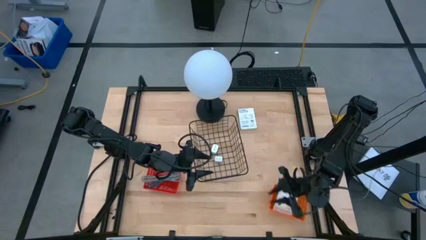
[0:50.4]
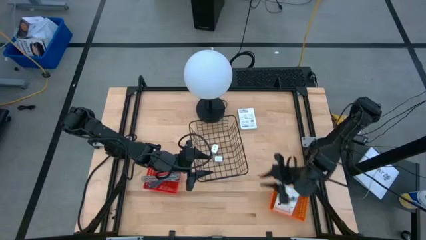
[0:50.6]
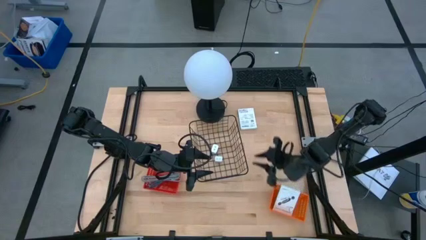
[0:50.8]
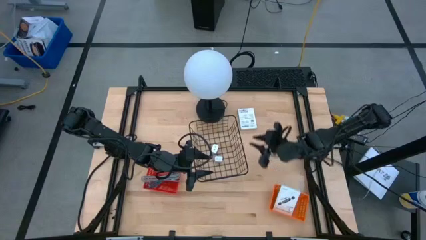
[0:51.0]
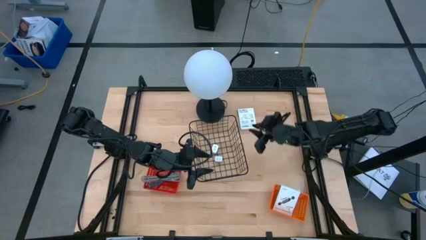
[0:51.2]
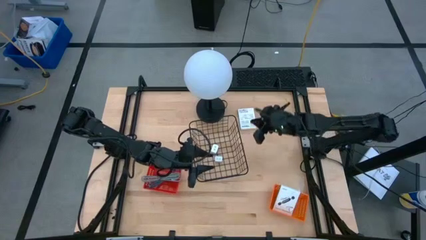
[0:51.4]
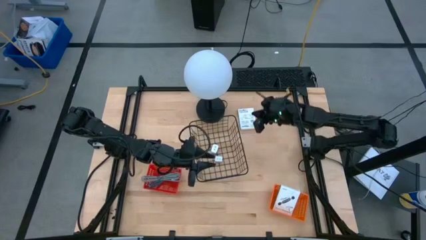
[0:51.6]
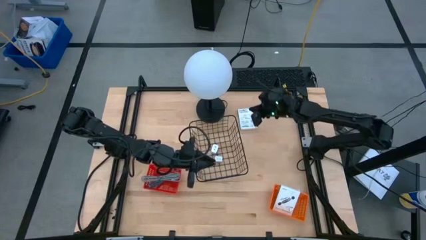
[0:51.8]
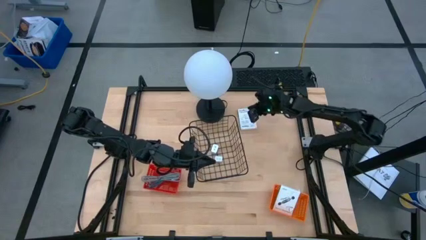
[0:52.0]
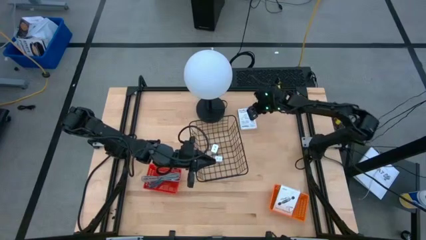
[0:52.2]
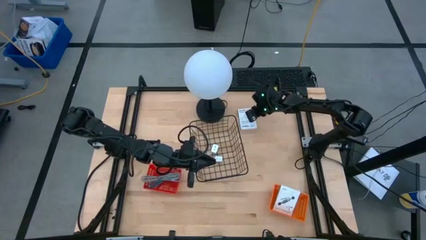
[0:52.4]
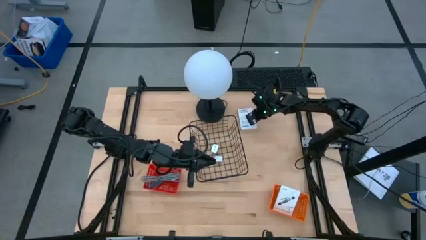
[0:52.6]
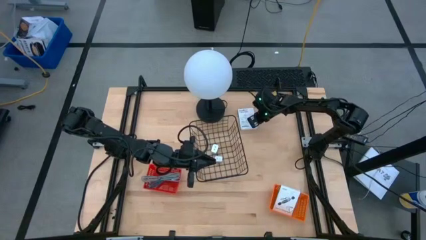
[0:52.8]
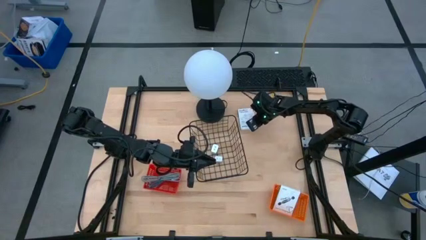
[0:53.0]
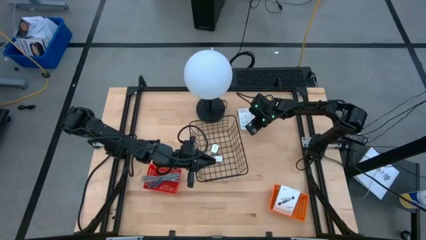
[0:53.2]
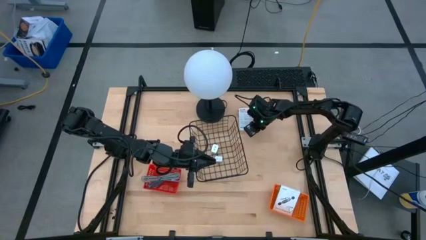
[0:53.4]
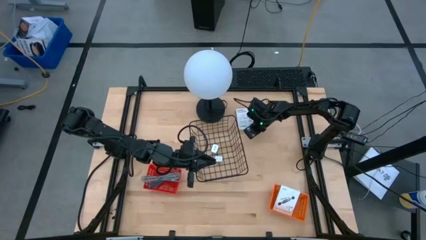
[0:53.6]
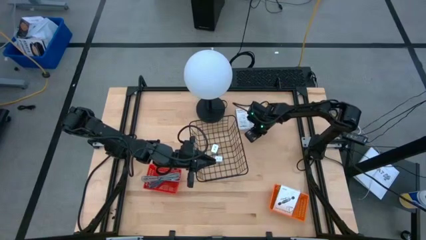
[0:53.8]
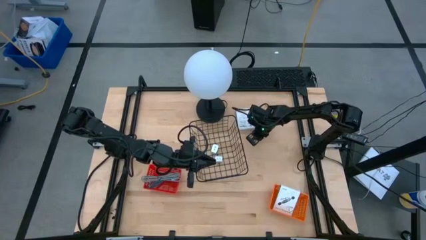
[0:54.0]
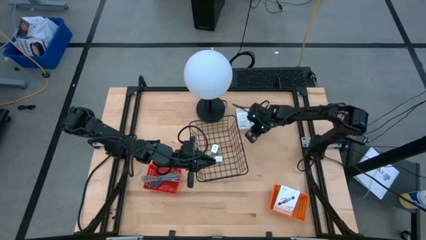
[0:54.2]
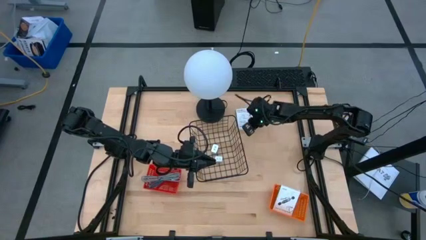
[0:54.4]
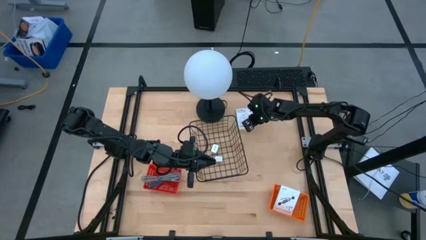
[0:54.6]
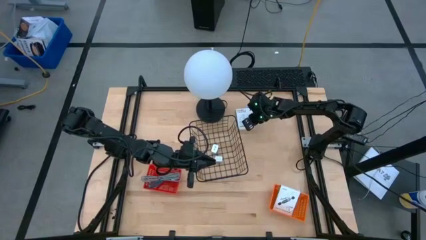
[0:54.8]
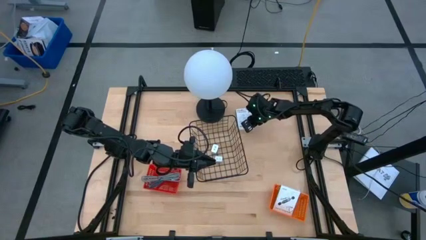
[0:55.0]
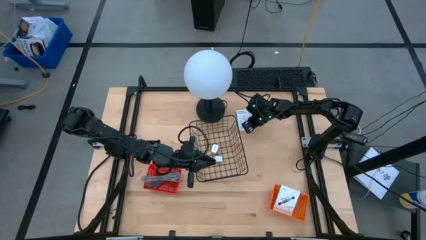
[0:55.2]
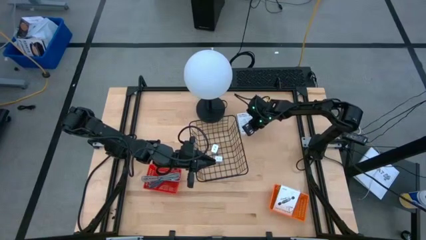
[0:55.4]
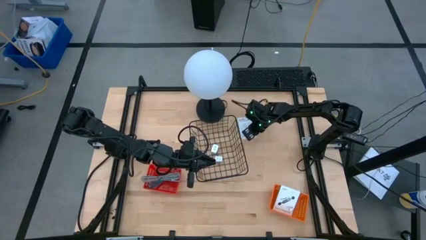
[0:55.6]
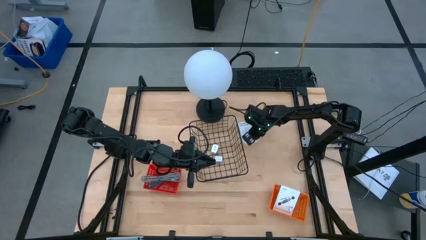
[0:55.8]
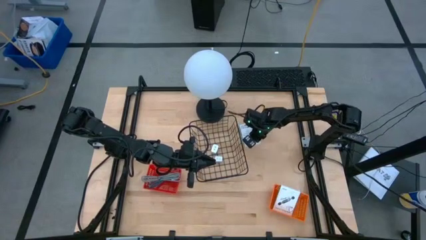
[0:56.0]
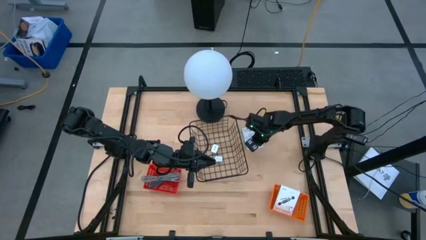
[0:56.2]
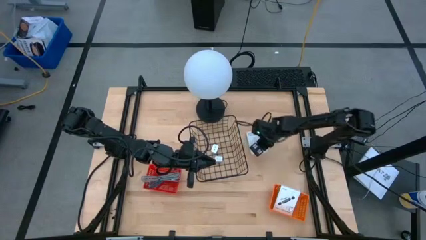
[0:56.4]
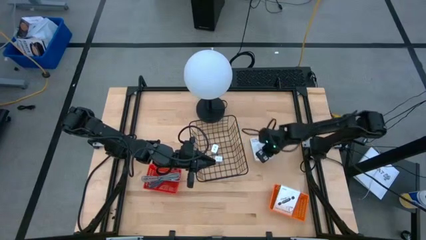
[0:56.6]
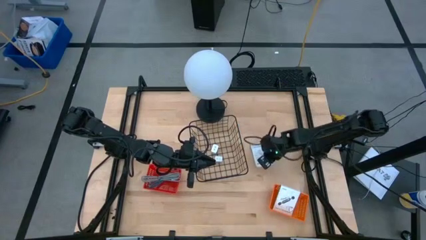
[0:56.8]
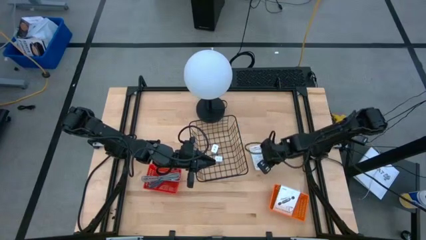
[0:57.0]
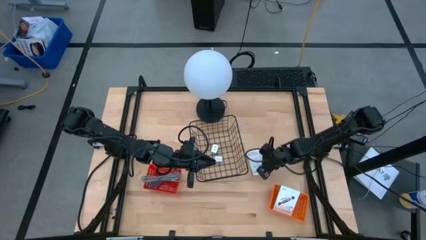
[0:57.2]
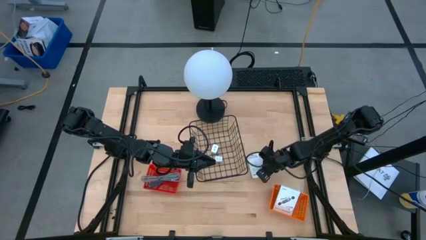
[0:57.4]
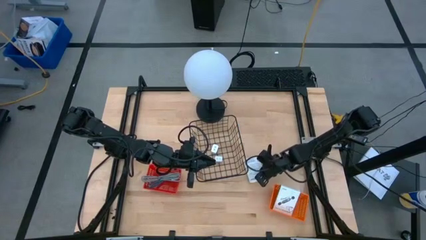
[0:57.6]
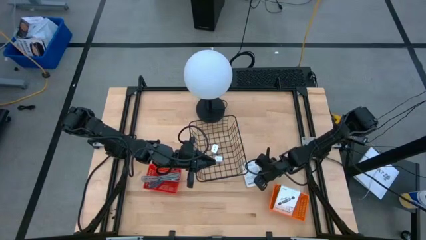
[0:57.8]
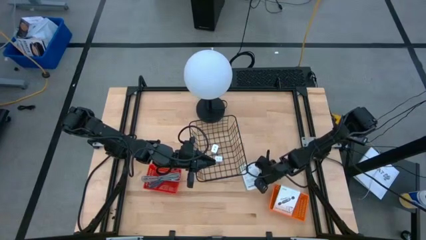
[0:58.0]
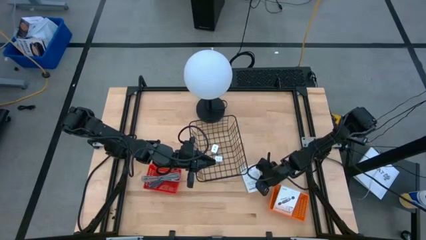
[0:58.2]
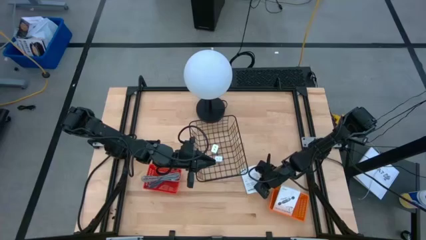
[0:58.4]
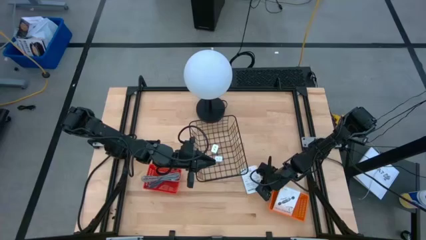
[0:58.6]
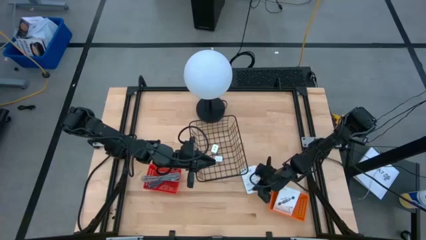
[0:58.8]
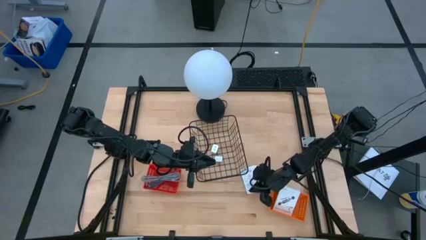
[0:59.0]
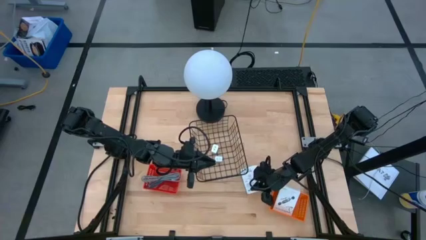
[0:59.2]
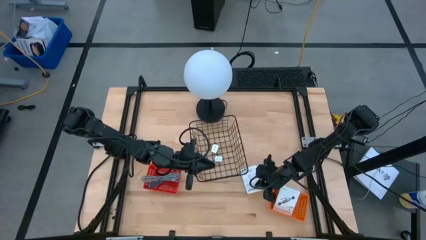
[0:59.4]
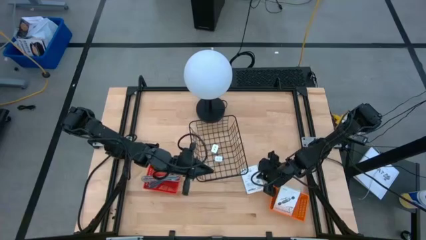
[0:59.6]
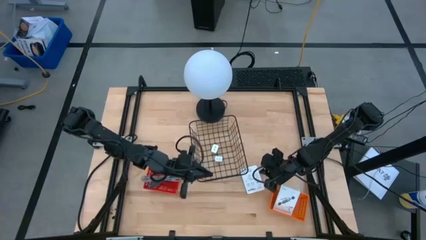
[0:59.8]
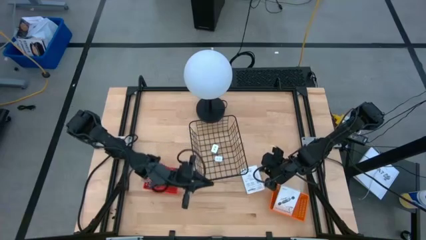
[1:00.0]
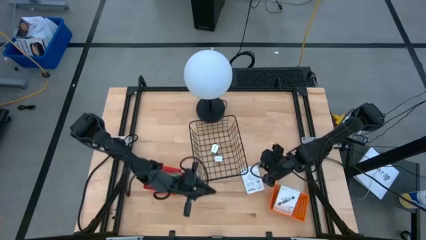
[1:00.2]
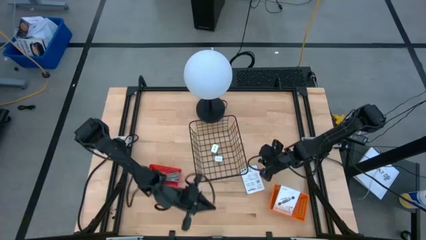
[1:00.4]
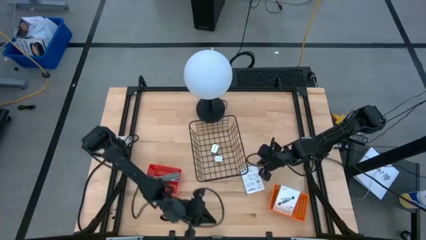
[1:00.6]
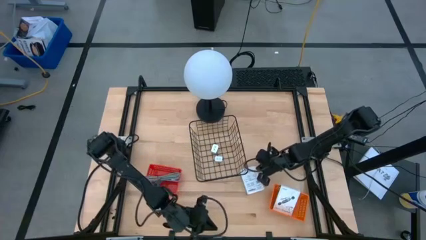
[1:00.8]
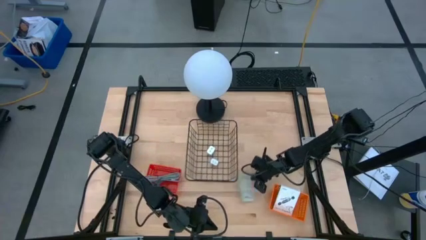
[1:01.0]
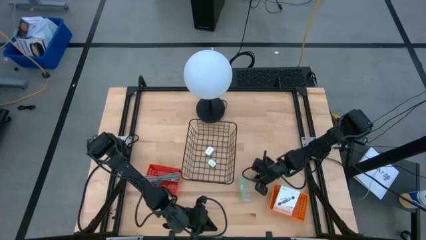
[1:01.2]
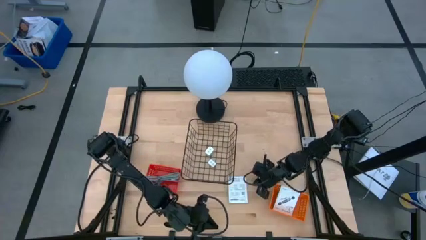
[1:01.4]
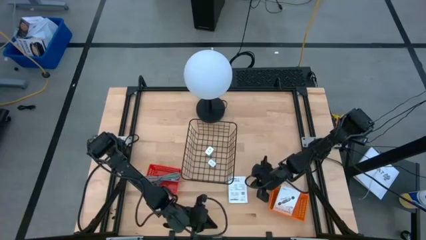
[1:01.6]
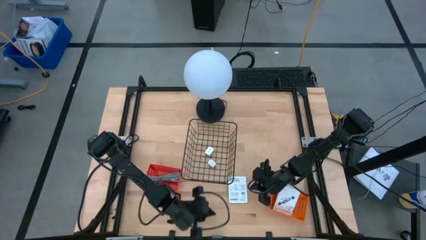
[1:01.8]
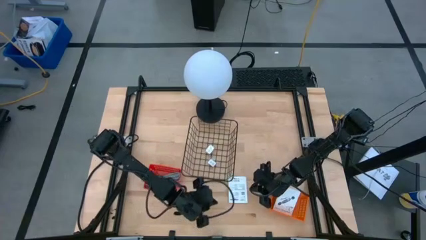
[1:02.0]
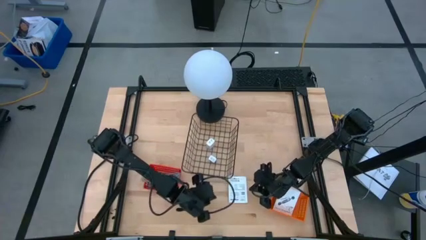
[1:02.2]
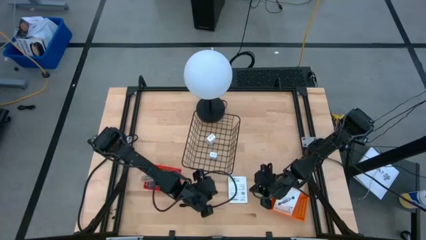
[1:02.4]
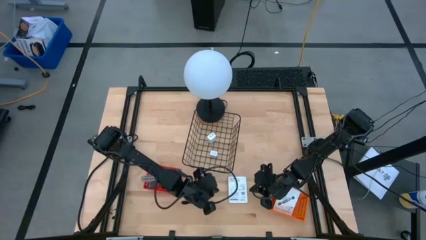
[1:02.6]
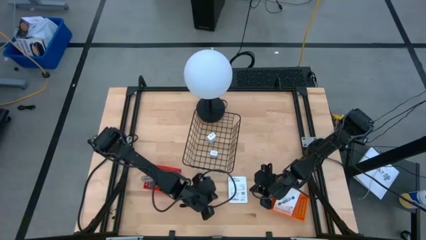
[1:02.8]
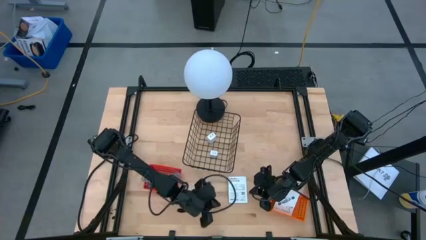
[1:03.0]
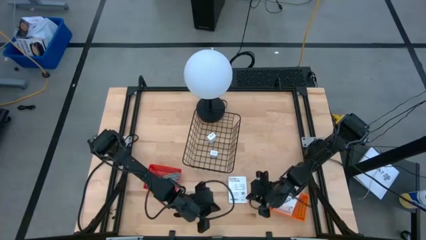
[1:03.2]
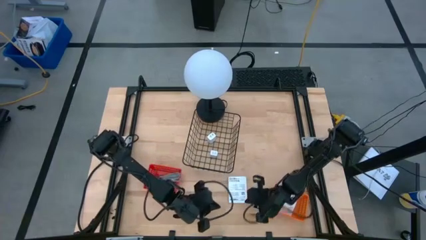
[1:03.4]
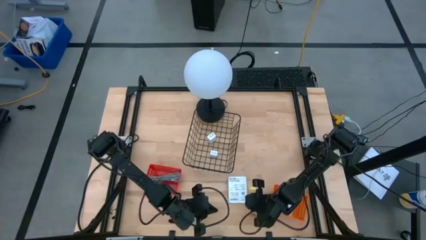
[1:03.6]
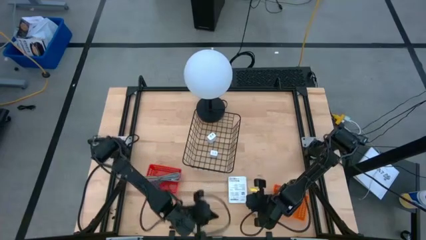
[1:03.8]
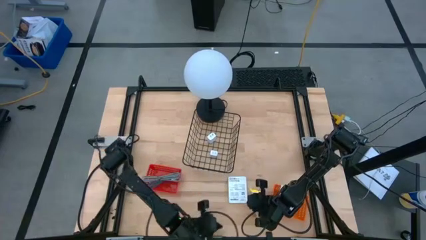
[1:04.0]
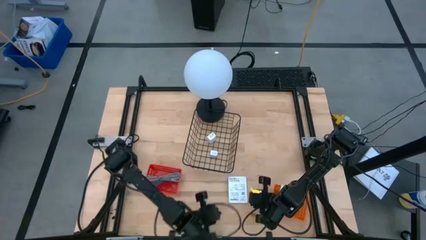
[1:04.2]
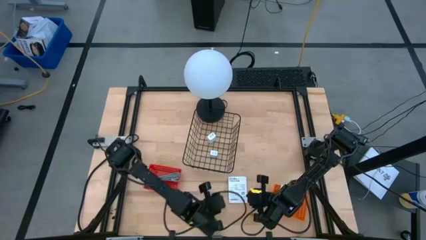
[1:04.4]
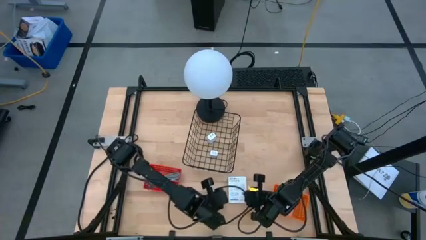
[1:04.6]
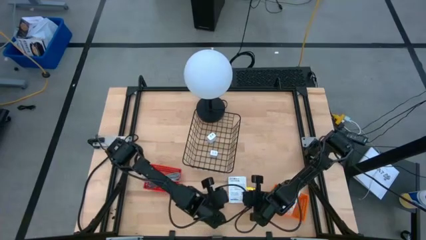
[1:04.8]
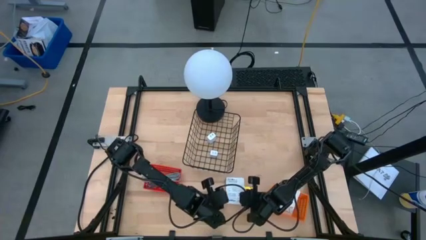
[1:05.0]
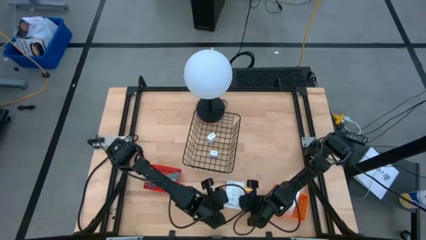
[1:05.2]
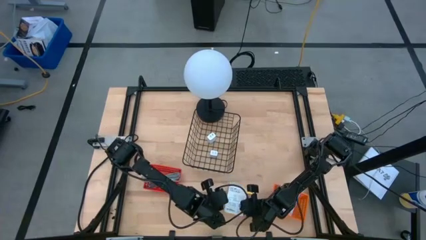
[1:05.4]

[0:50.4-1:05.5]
Task: Pick and place items into bin
Put the card reader box into the orange bin

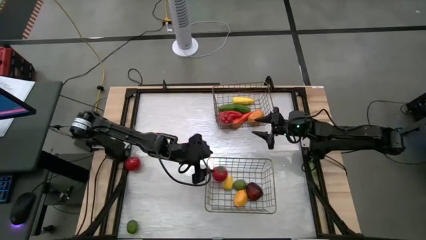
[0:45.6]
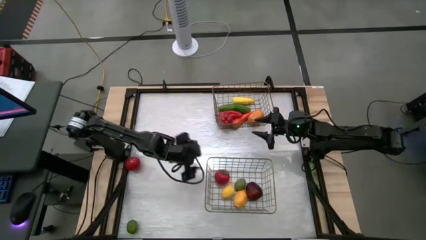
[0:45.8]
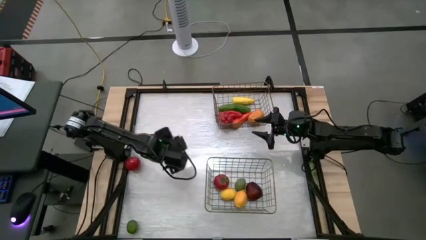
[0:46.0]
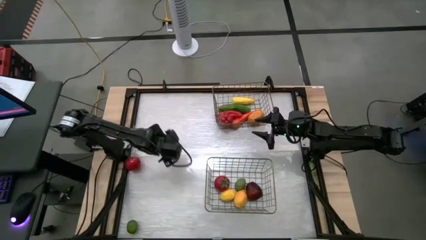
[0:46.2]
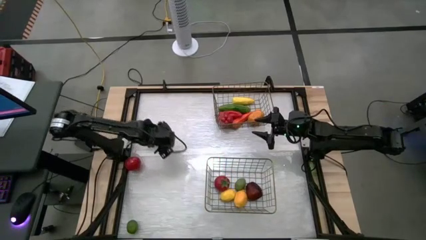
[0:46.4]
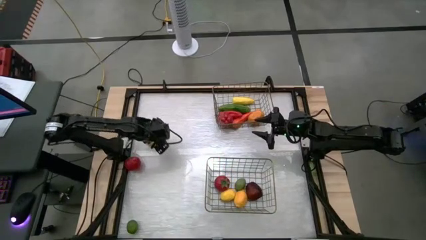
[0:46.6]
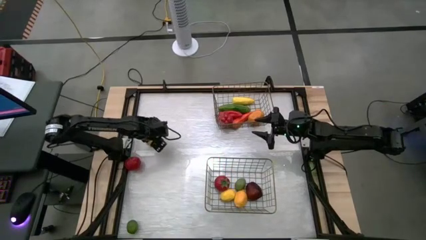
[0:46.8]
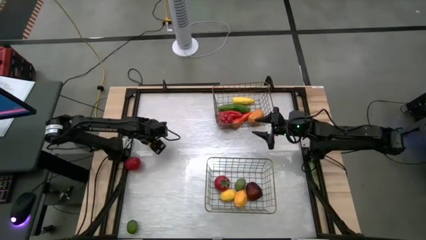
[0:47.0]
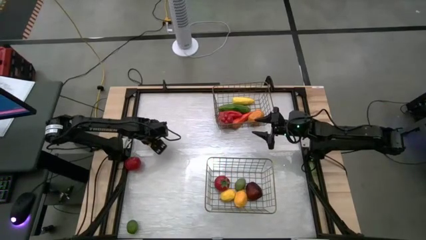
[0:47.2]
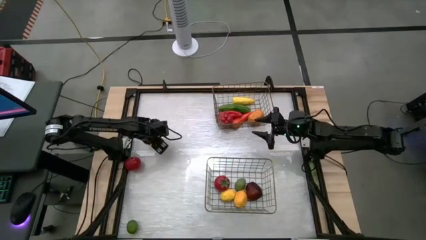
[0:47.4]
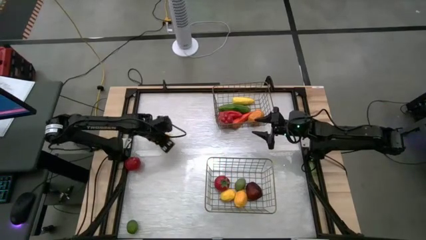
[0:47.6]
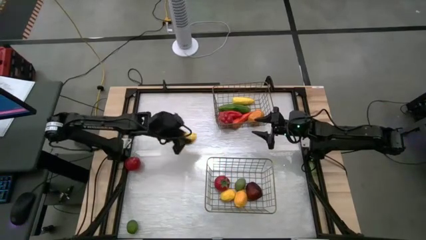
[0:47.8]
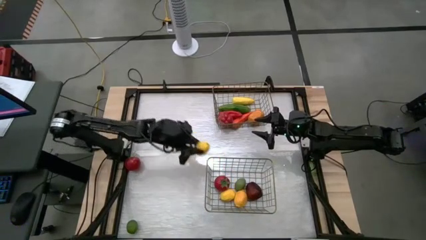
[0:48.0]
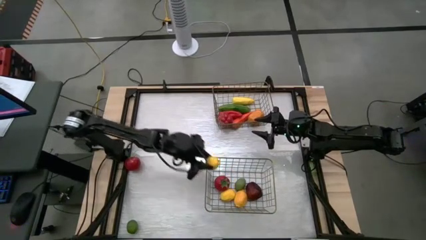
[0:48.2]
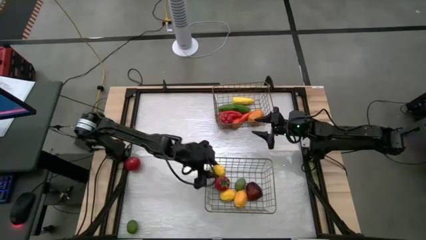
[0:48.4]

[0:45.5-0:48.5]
Task: Sort produce into baskets
Put the yellow lemon into the bottom wire basket
